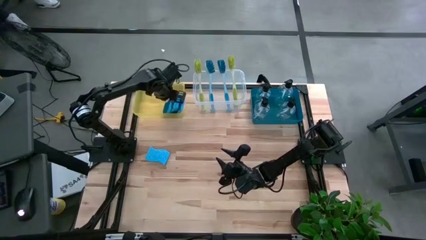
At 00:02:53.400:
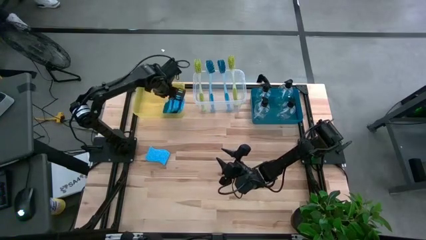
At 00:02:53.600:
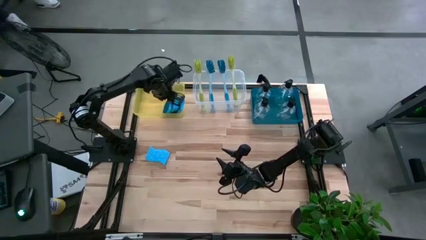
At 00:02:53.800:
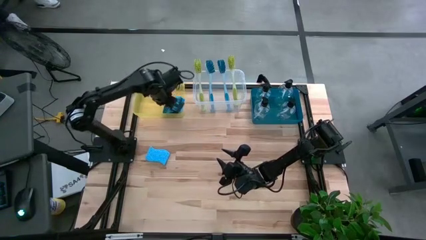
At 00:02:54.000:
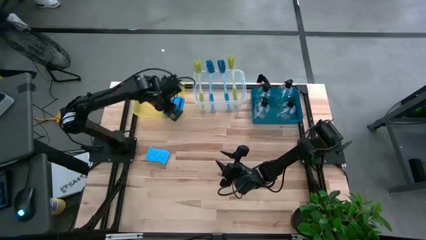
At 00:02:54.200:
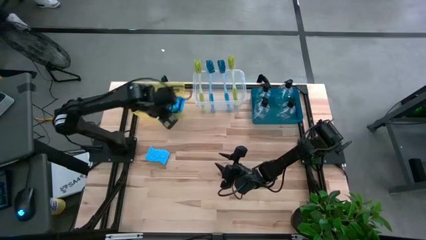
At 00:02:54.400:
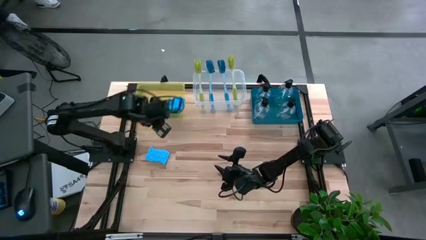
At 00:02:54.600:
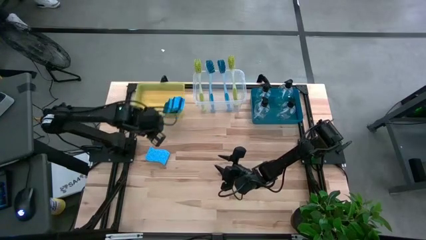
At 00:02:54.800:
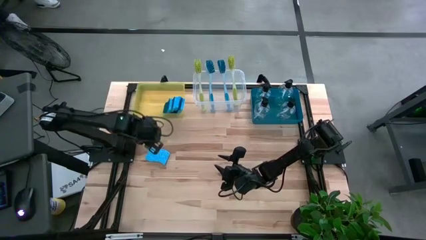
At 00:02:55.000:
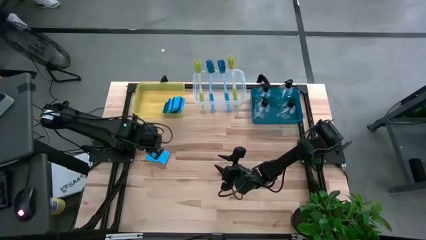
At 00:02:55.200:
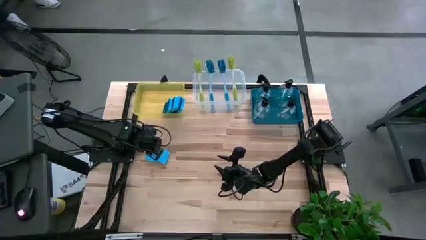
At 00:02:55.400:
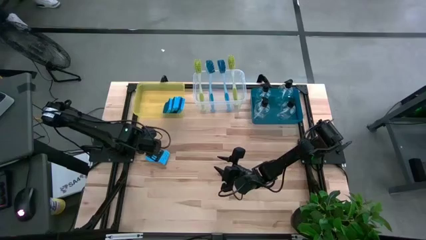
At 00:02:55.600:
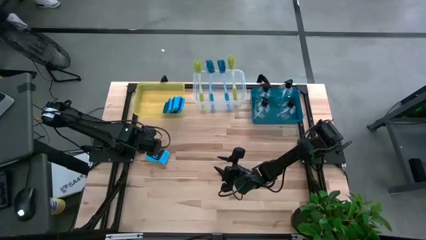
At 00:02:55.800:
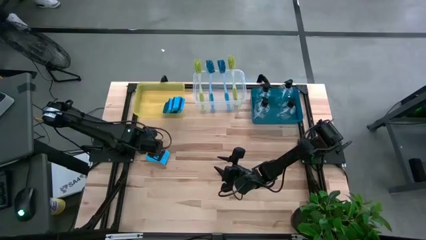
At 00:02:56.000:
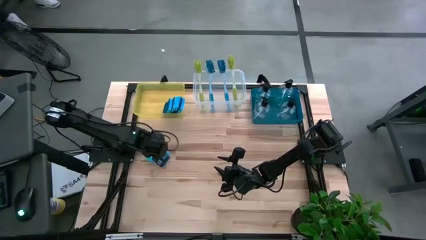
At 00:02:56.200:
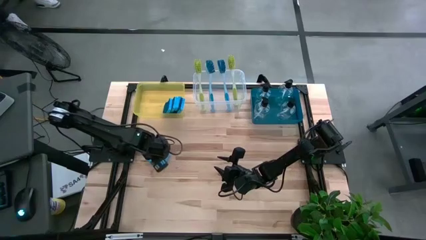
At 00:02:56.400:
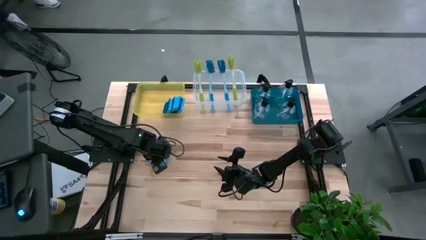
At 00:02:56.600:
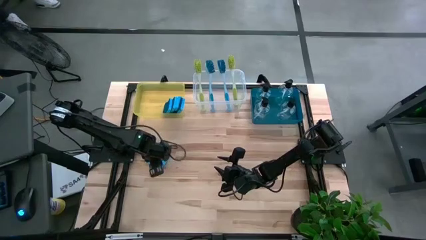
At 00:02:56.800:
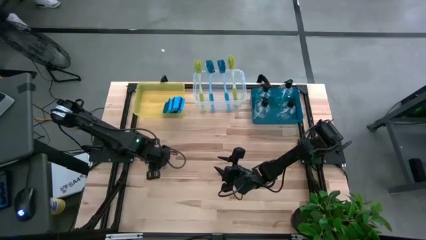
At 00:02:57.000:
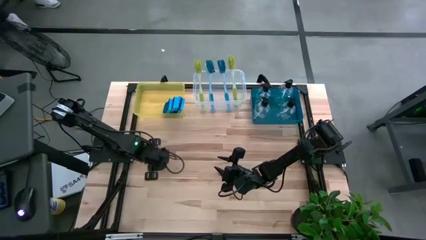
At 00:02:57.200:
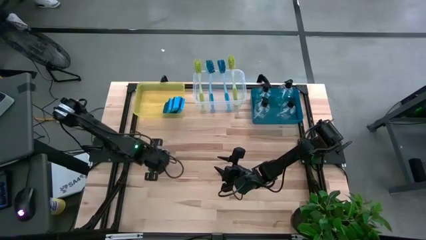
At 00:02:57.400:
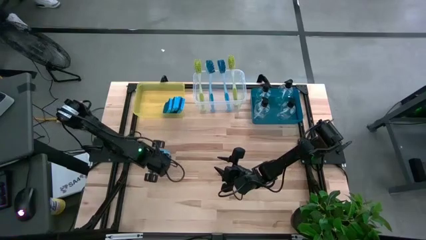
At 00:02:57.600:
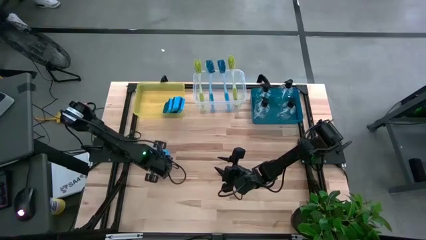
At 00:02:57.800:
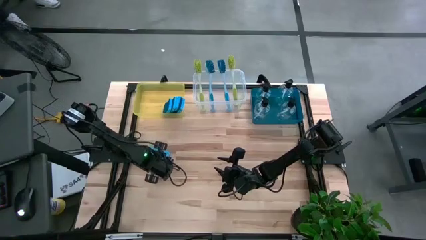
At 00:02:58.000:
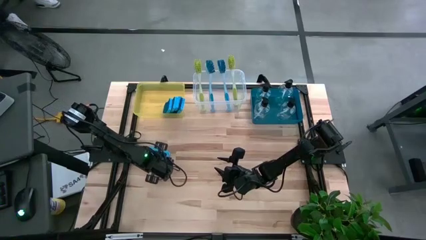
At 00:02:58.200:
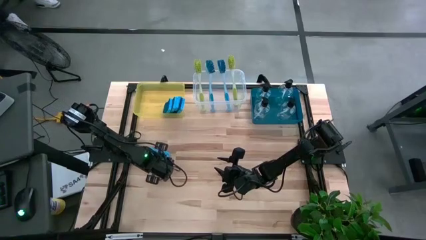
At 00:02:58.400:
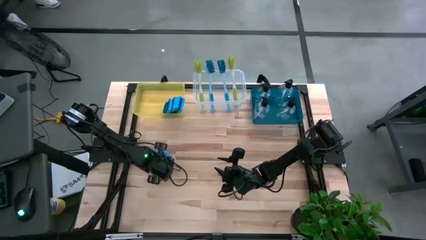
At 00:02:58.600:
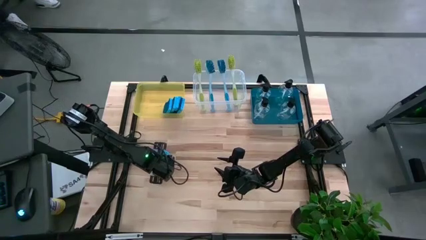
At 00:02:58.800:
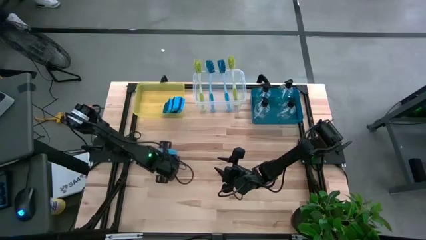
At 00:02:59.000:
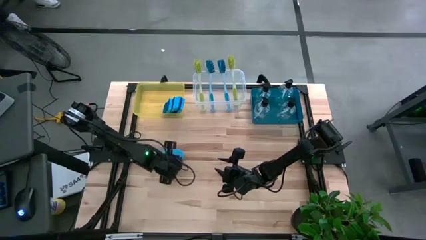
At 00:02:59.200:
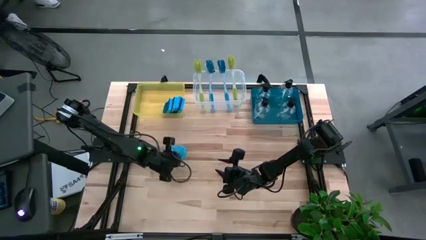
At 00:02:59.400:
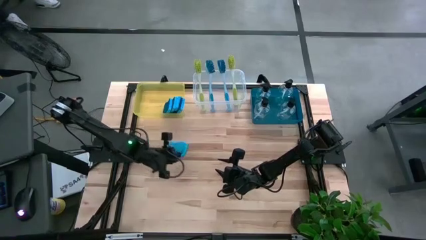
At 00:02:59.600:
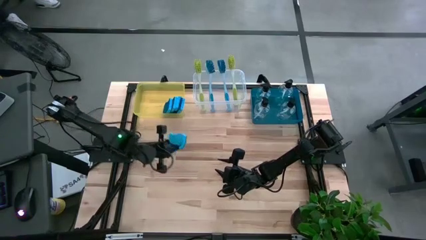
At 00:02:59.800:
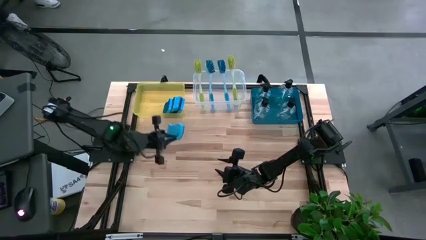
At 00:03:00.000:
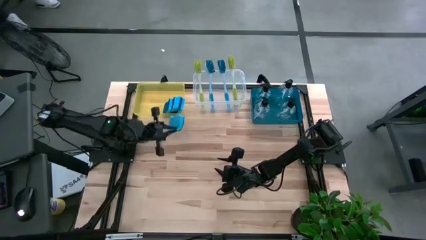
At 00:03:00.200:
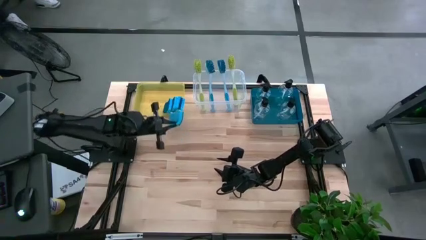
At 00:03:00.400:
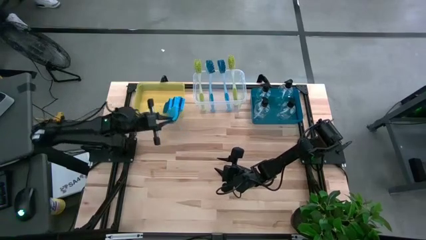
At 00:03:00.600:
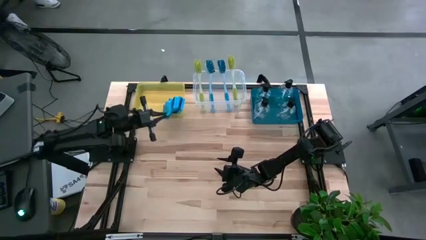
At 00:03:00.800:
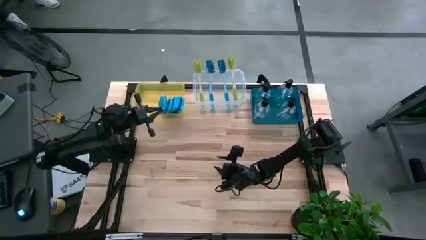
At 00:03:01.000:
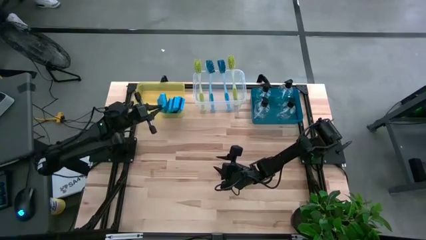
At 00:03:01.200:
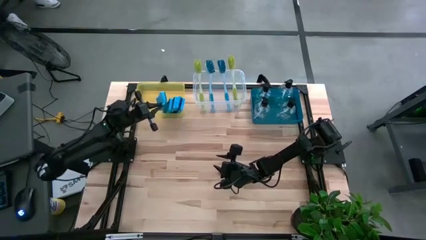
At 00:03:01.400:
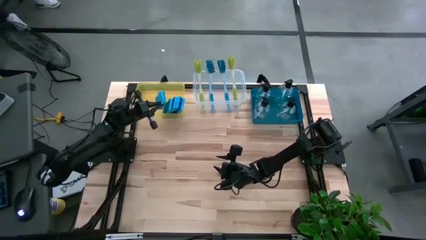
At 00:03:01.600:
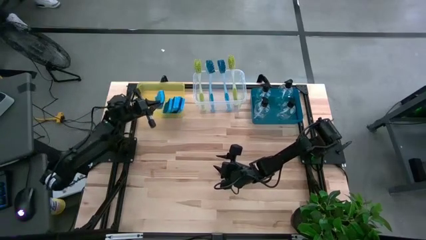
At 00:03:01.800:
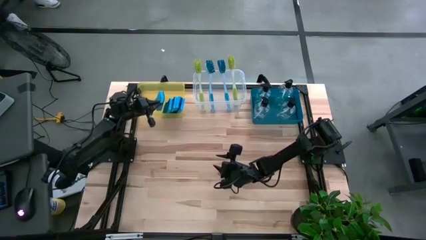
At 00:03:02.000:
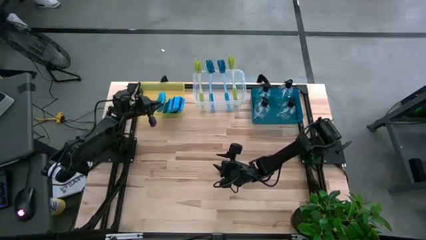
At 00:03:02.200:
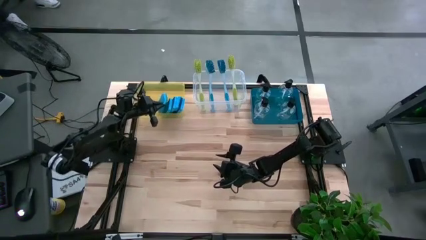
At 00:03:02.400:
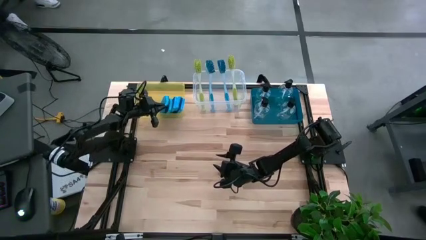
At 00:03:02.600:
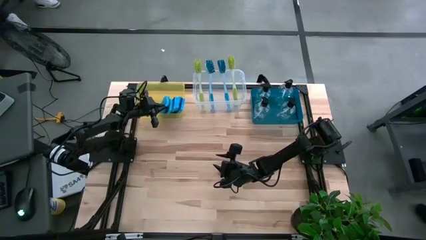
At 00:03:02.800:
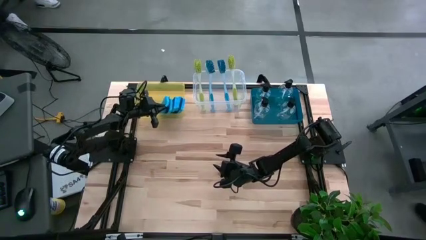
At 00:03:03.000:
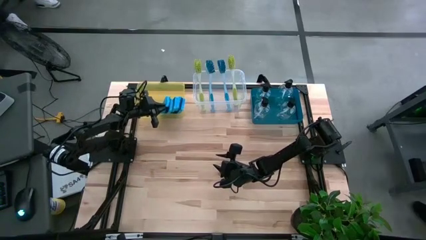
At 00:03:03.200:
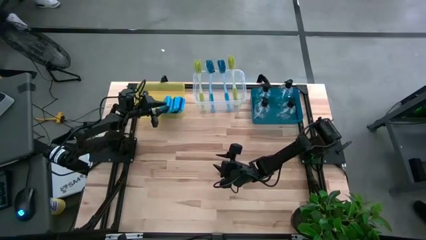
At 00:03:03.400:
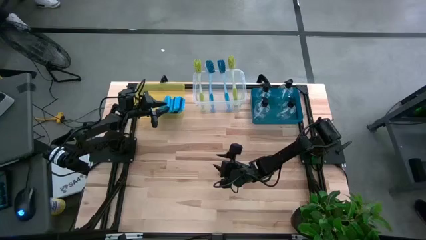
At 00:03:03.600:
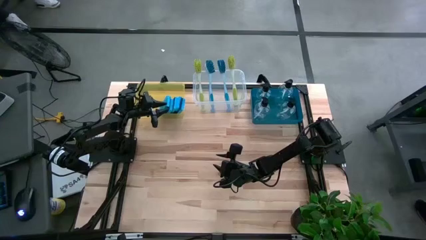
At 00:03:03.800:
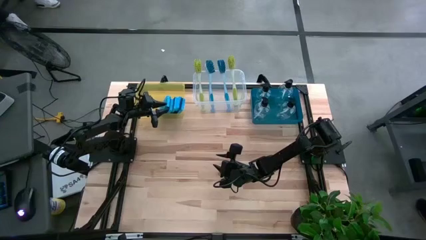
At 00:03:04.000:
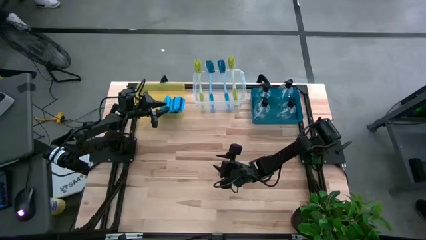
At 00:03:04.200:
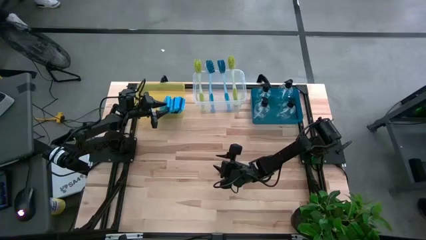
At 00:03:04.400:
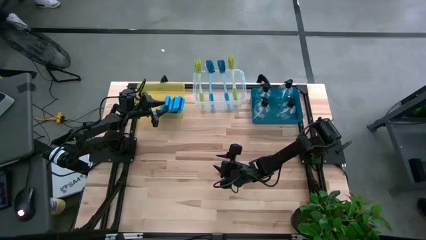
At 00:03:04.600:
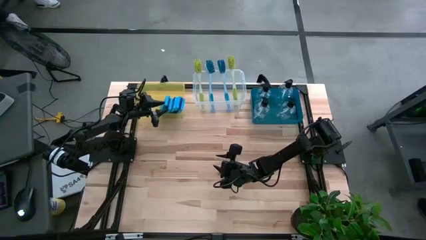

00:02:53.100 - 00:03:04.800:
Task: Pick & Place Kitchen Sink Supplies
Put the blue sponge into the yellow bin

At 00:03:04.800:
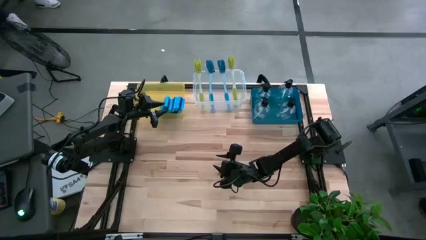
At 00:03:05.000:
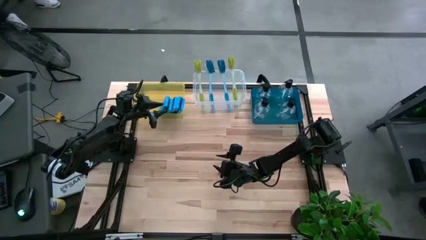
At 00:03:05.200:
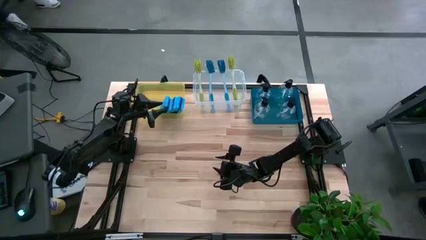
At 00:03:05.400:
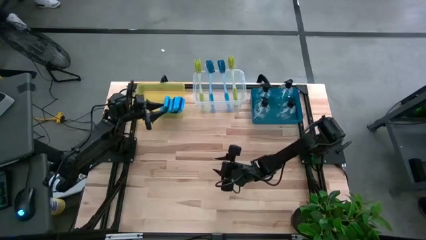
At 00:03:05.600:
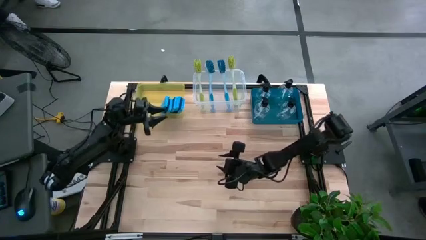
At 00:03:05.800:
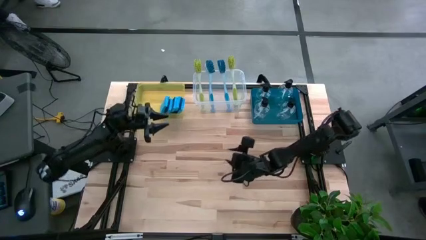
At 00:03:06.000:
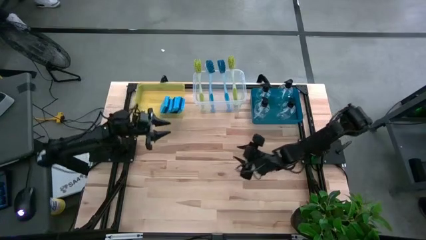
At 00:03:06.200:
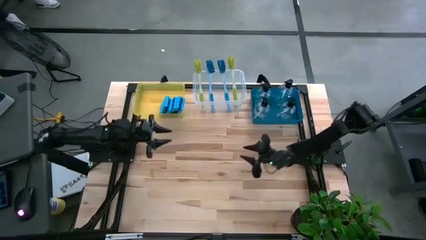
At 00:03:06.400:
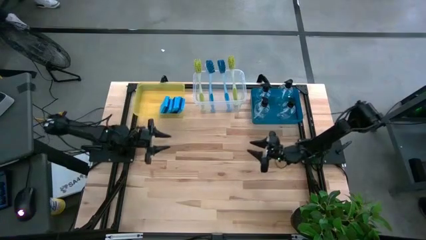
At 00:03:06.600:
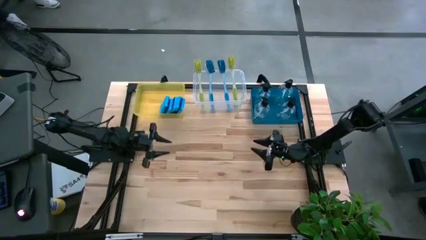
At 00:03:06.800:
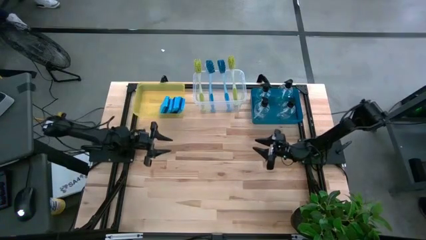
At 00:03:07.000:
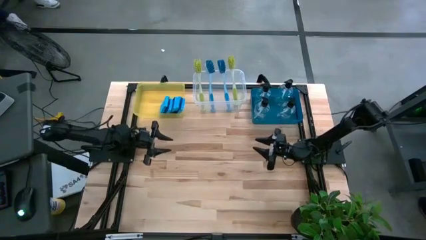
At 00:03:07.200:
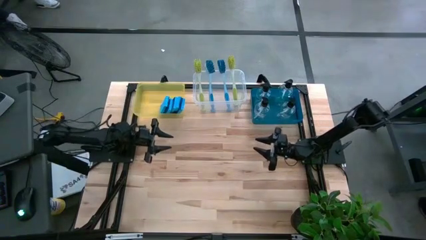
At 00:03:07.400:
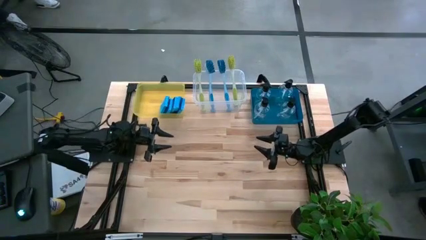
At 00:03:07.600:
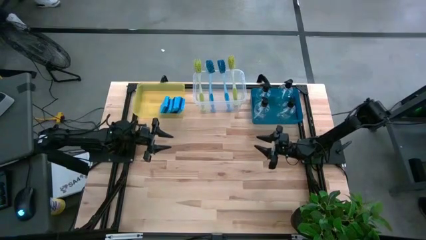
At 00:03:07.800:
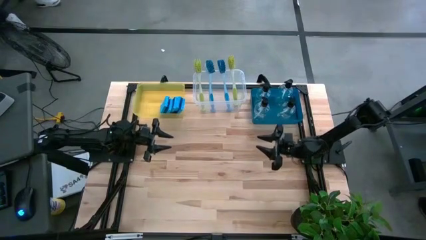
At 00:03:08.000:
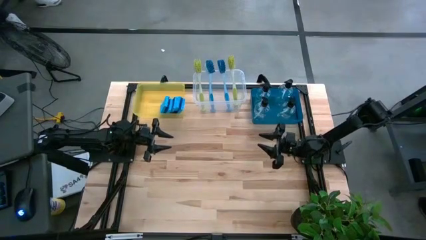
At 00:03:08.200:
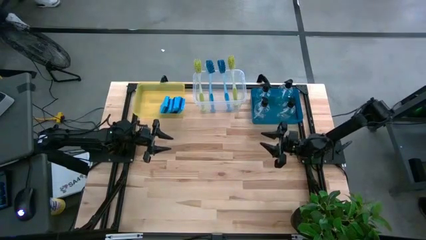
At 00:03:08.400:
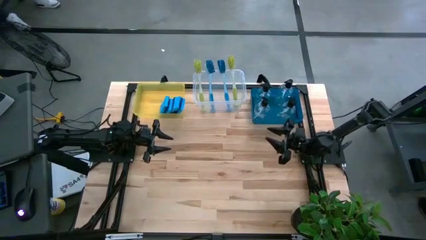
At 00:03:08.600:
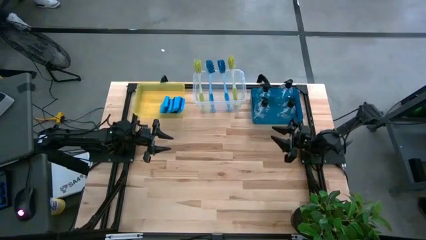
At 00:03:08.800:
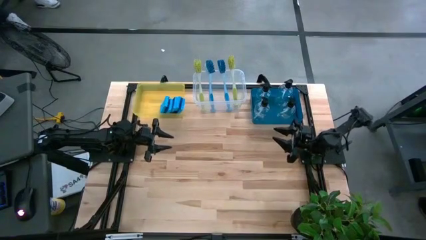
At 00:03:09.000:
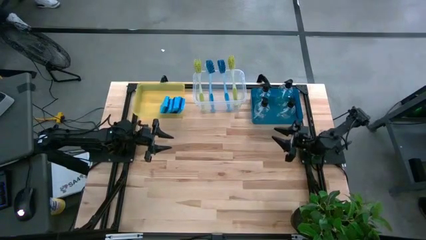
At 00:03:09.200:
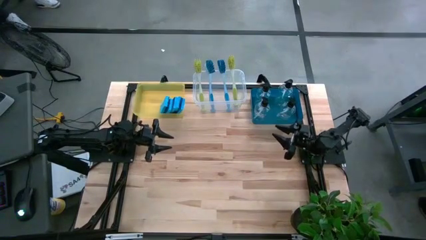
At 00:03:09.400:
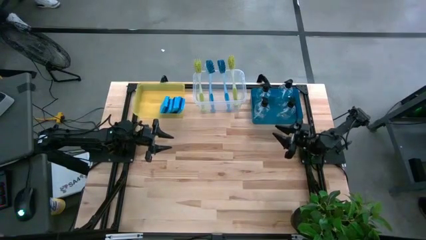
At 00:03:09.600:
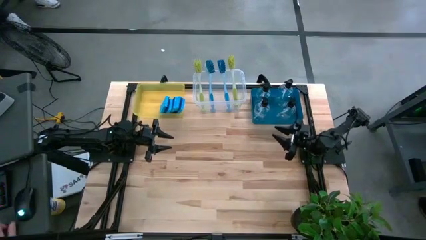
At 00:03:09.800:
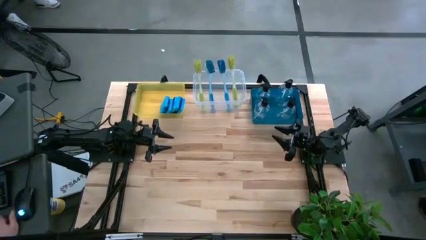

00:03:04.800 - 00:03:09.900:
Return to Home Position
